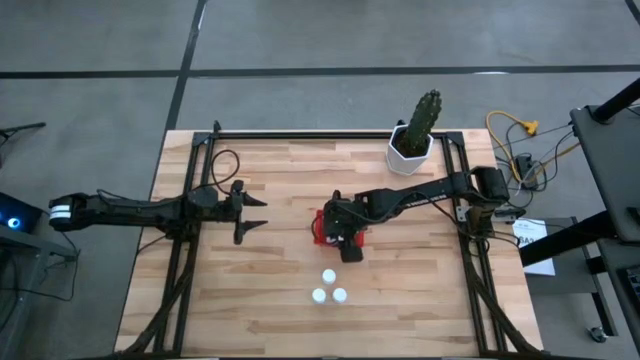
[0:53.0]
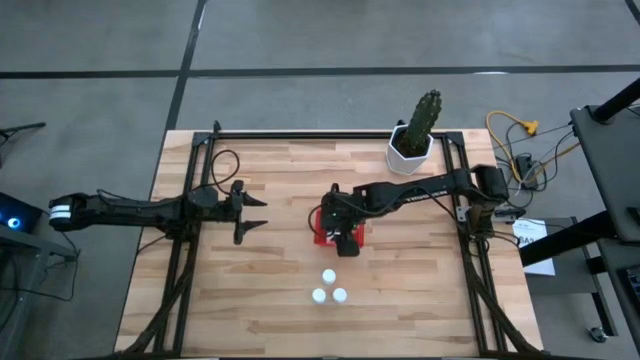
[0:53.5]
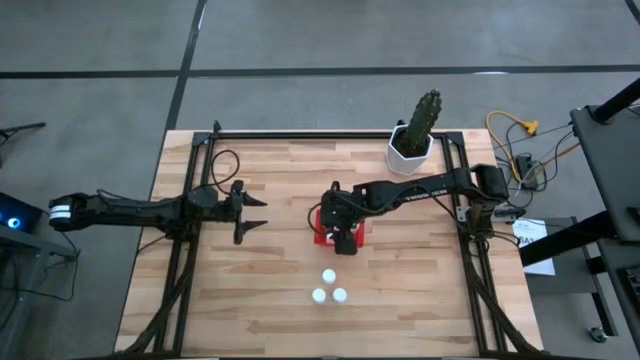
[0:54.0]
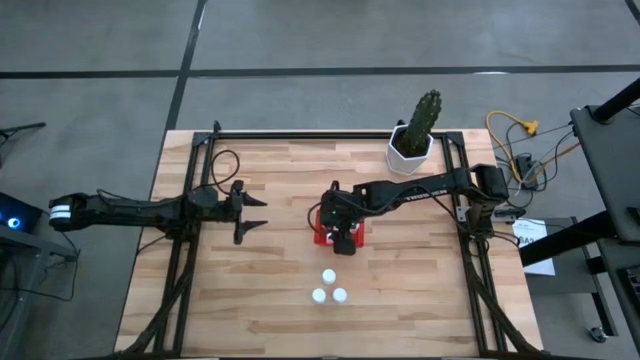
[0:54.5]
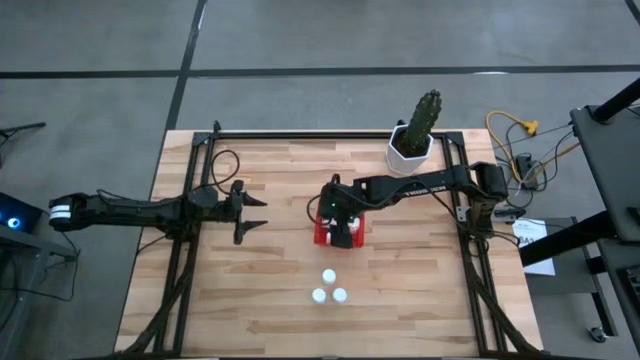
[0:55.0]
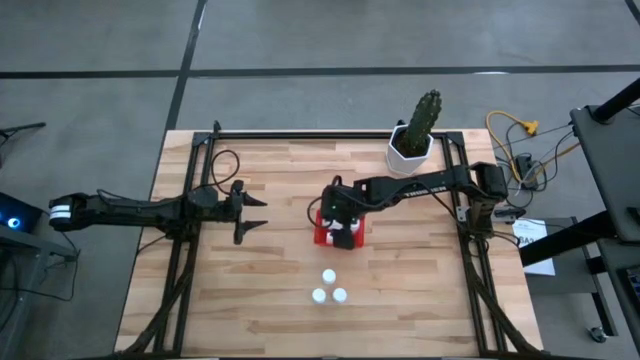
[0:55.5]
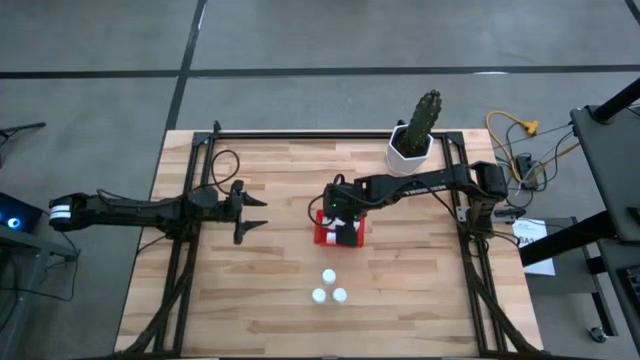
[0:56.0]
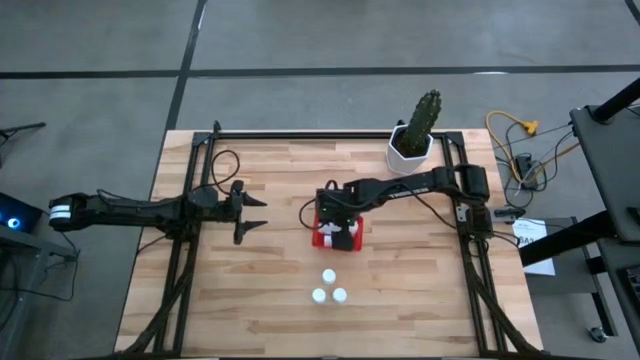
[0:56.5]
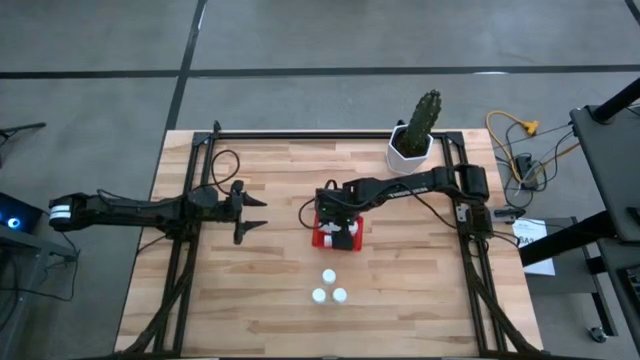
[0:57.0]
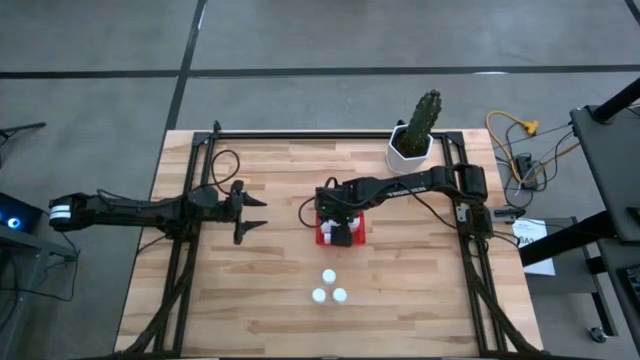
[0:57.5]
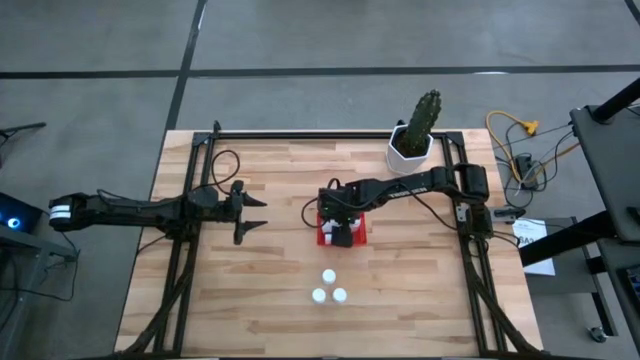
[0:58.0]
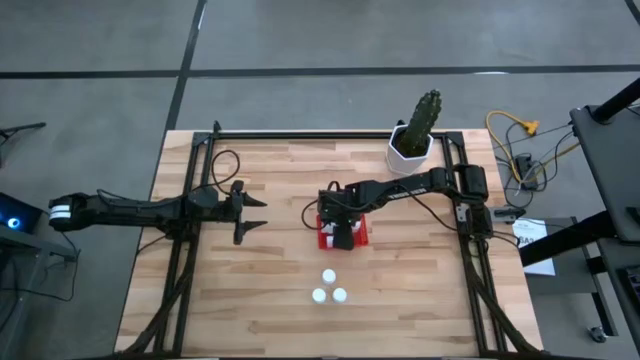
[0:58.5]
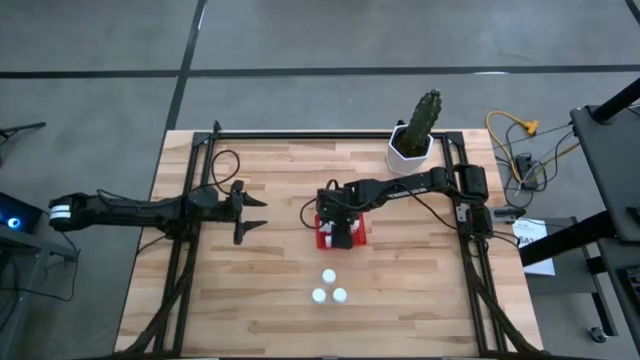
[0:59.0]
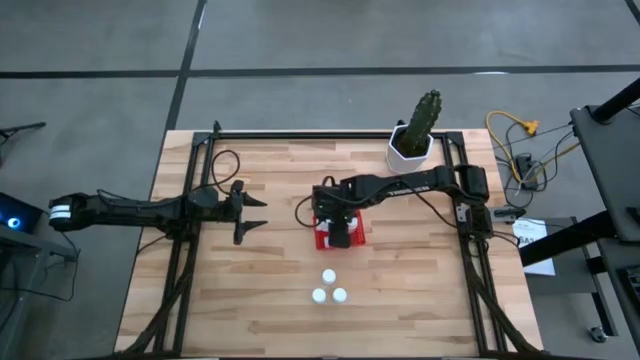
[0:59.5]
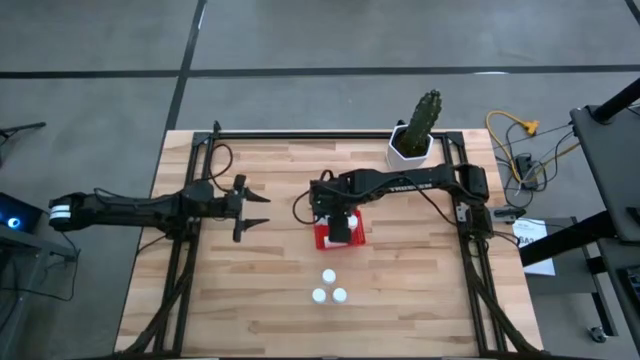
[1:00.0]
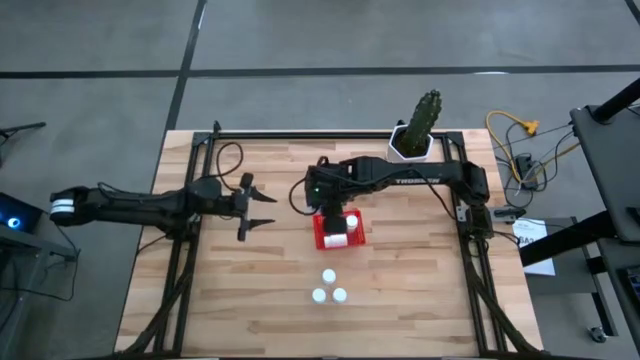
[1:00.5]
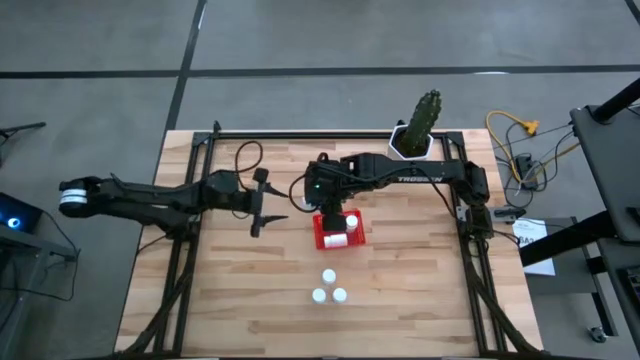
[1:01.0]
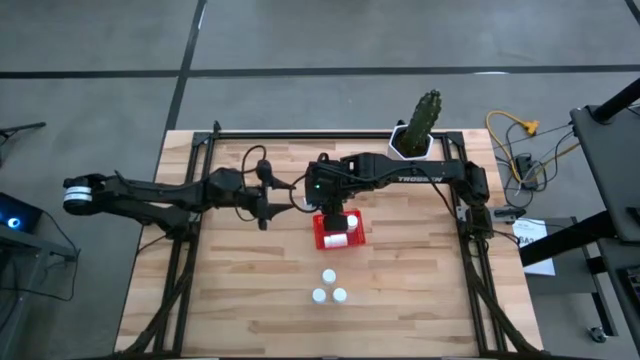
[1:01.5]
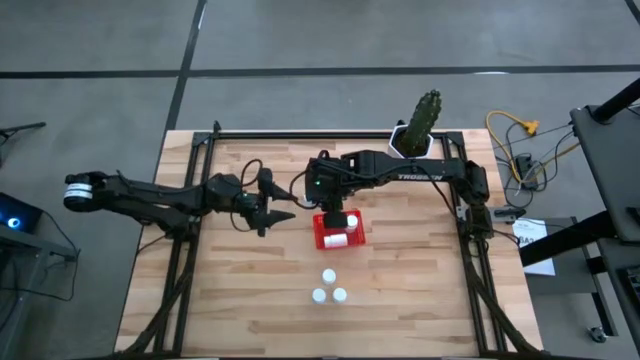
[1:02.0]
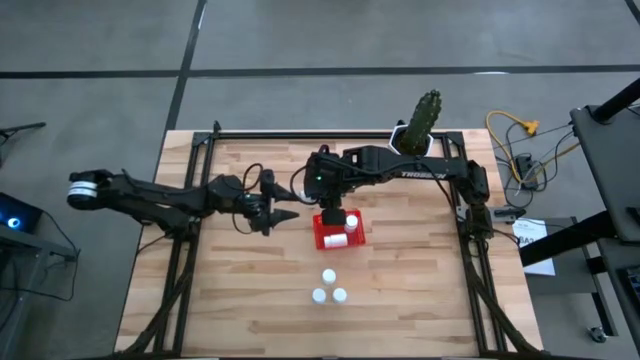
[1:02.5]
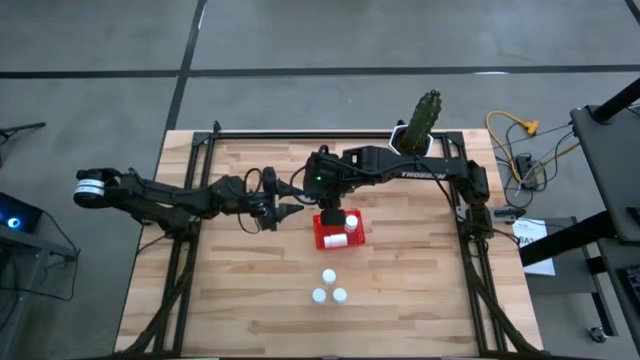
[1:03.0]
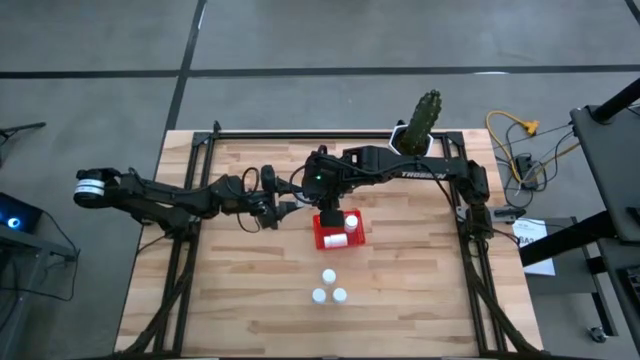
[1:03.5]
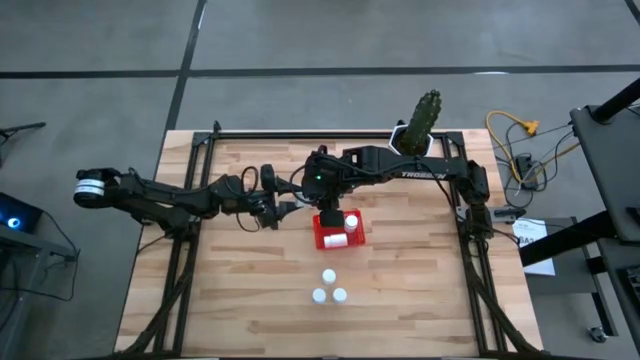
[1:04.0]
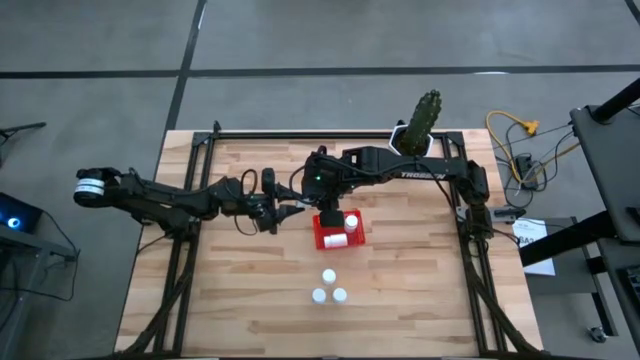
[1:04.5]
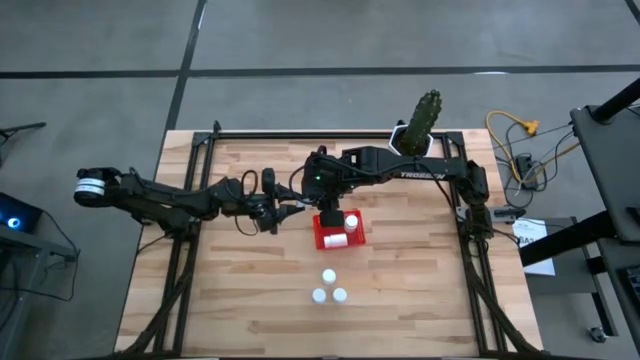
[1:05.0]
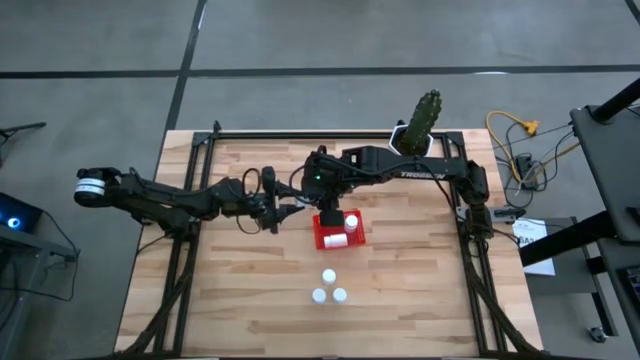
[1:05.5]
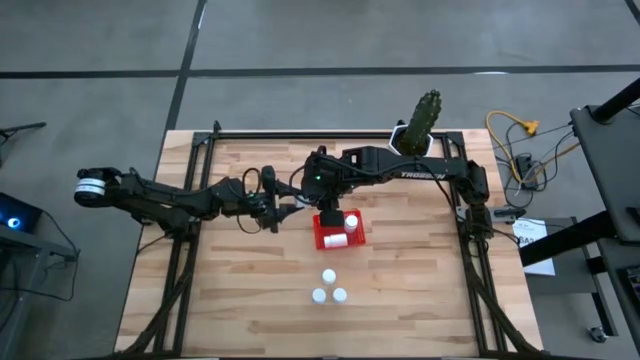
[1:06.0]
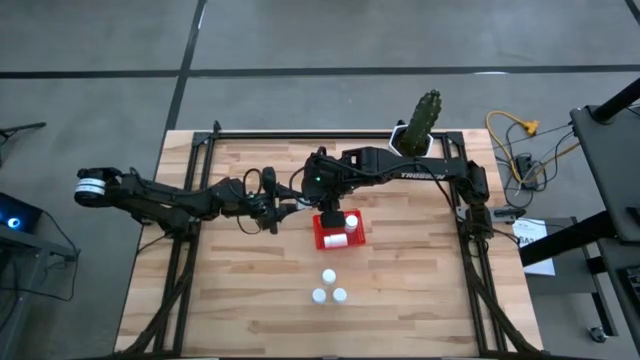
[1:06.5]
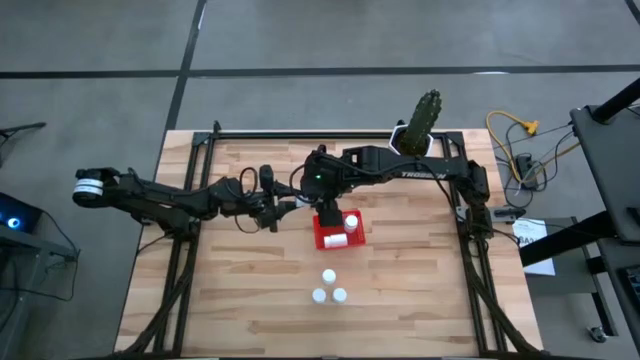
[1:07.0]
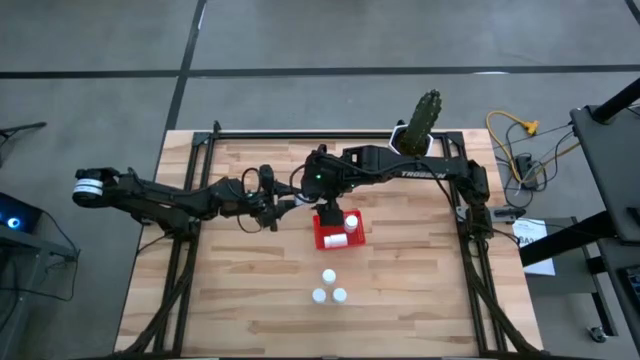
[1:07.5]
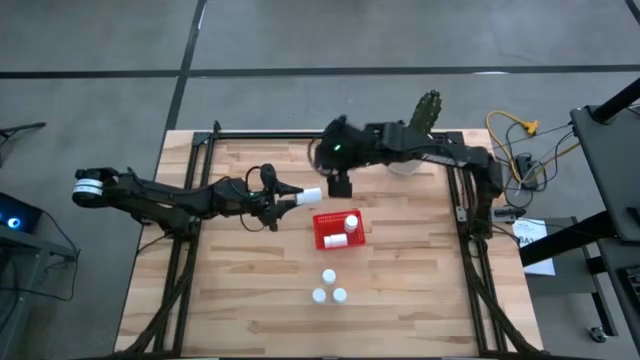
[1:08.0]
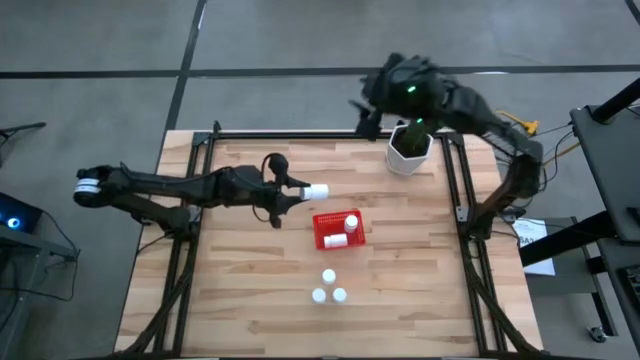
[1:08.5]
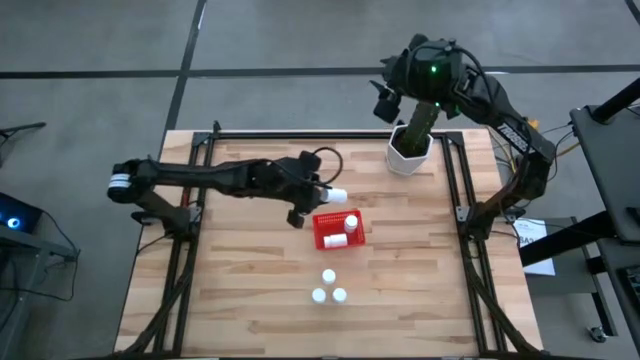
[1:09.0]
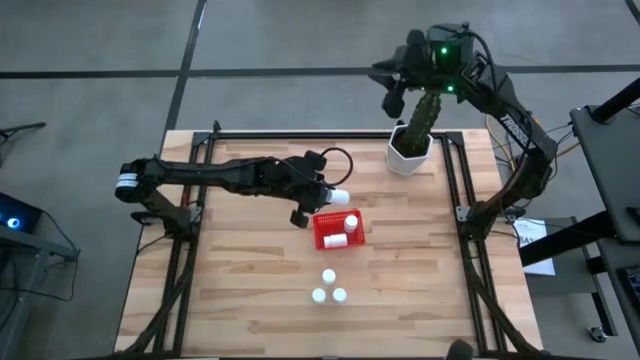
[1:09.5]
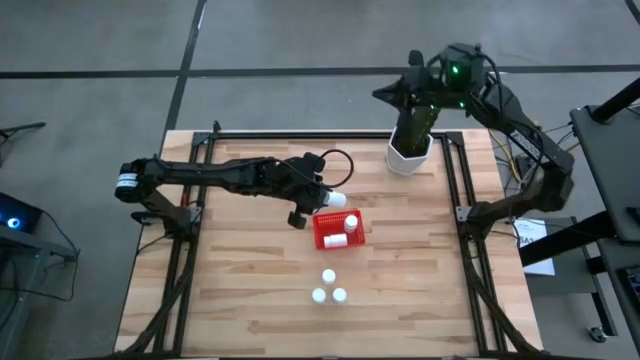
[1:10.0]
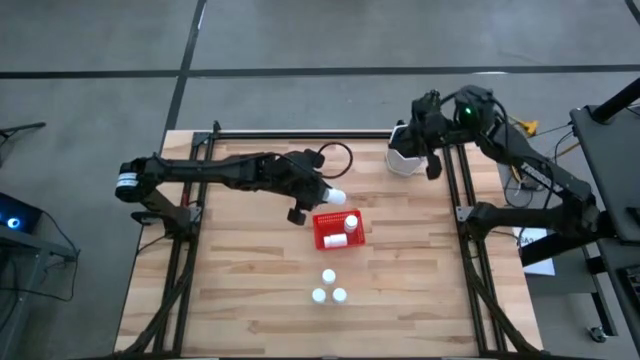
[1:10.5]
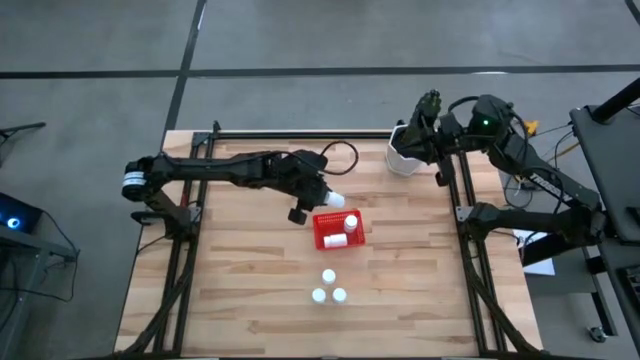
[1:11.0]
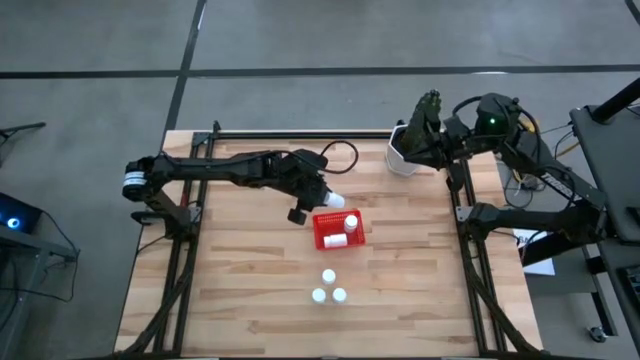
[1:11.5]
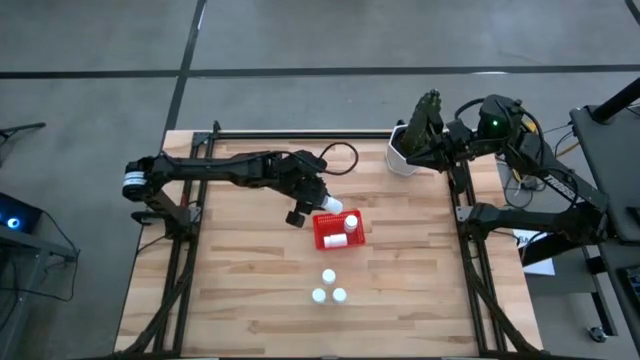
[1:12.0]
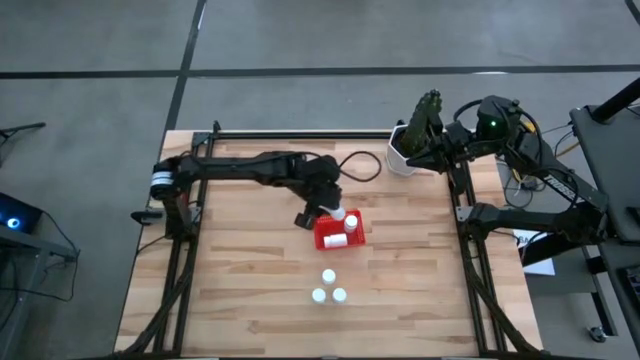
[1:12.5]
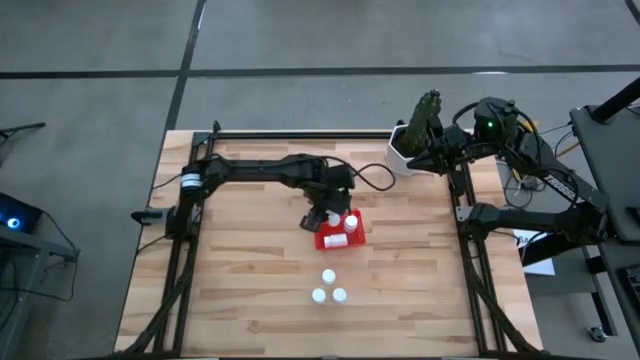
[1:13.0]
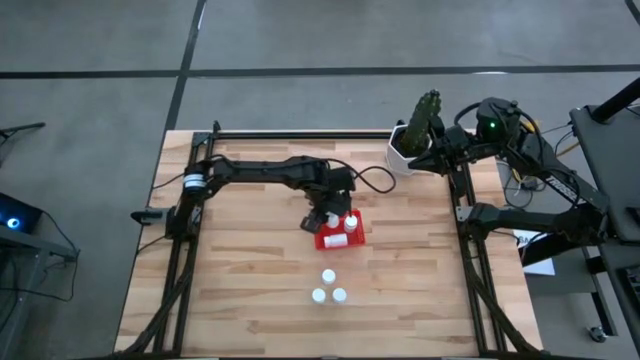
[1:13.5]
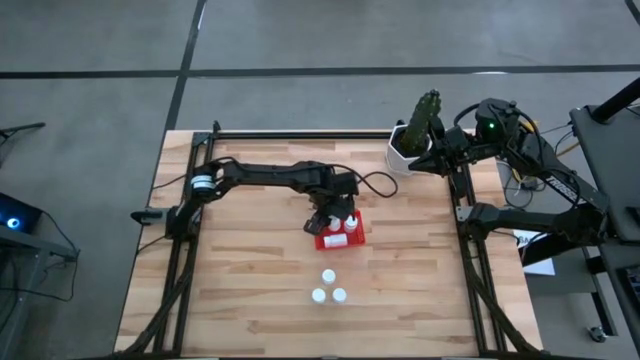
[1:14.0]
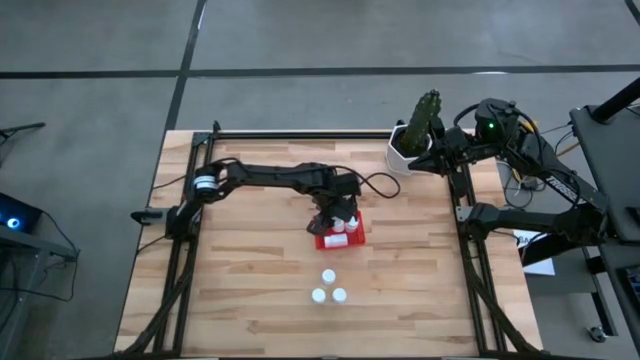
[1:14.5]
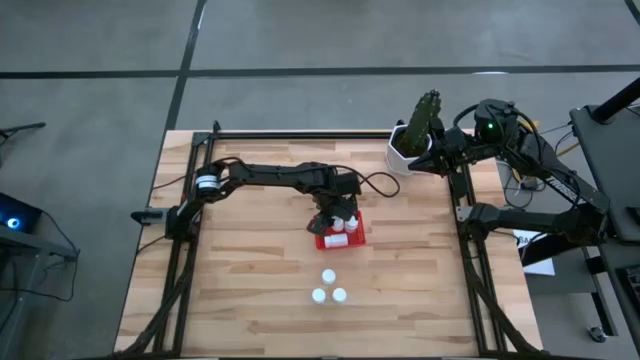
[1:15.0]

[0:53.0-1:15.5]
Task: Pick and place pill bottles into a basket
Adjust the white pill bottles in the red basket
